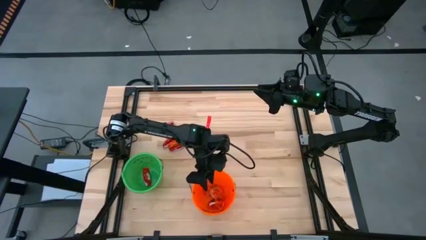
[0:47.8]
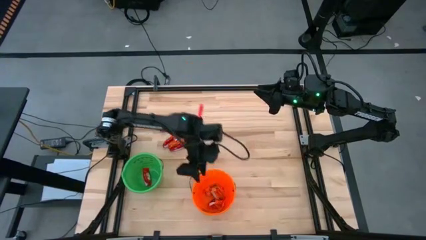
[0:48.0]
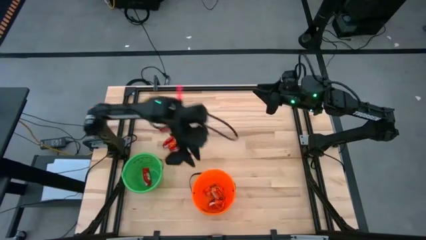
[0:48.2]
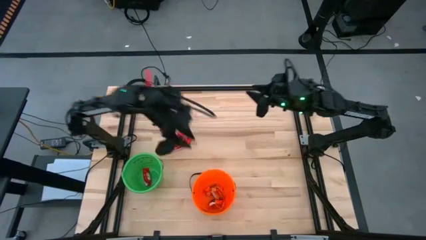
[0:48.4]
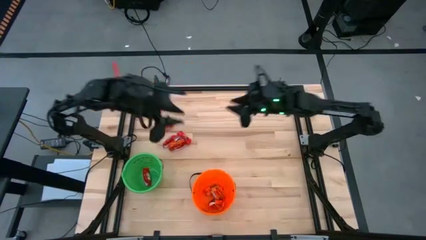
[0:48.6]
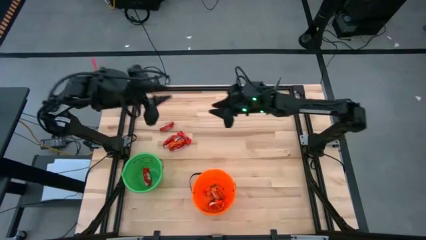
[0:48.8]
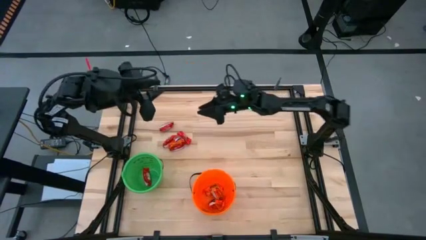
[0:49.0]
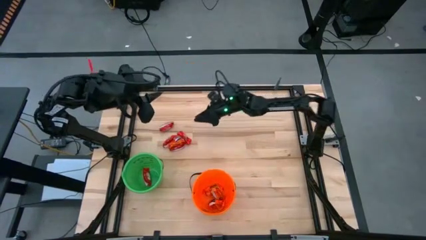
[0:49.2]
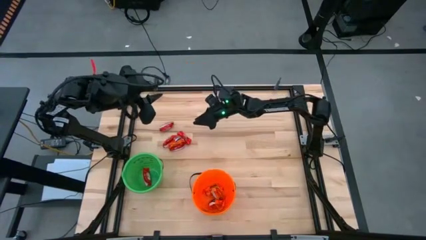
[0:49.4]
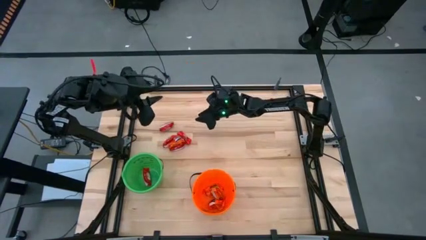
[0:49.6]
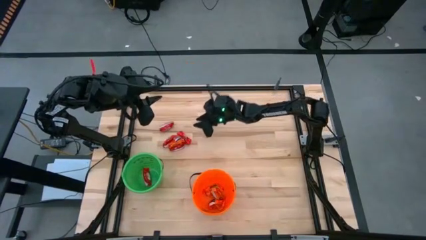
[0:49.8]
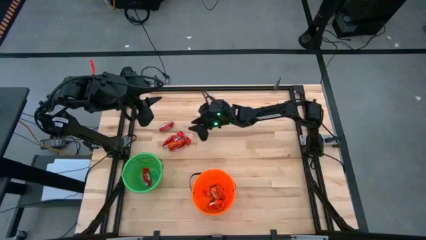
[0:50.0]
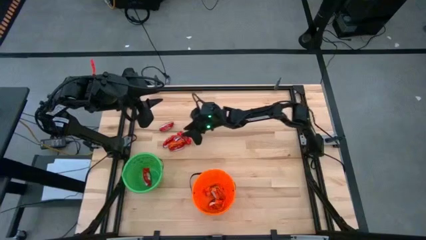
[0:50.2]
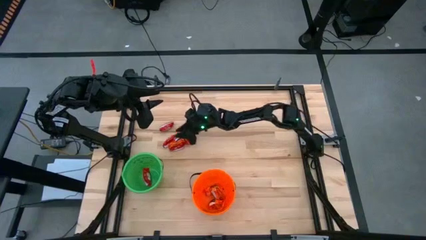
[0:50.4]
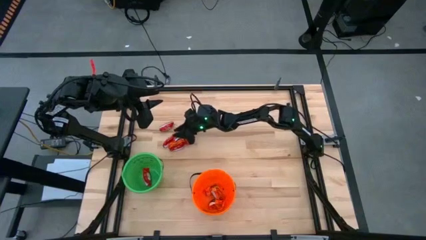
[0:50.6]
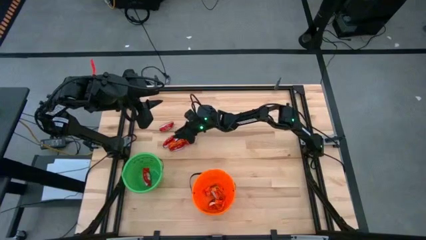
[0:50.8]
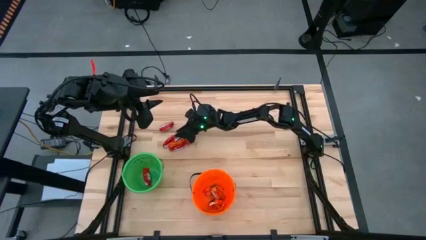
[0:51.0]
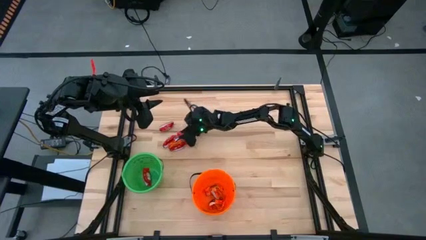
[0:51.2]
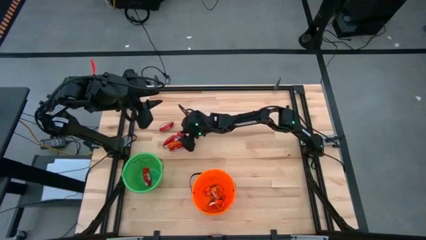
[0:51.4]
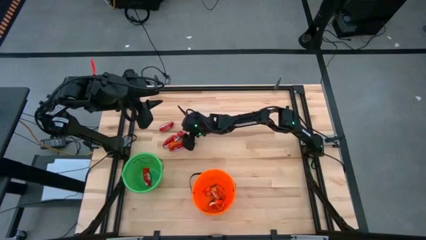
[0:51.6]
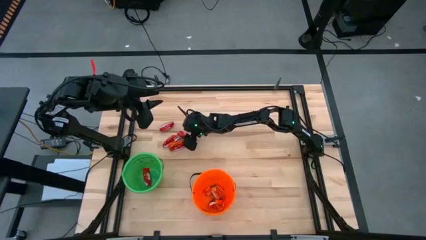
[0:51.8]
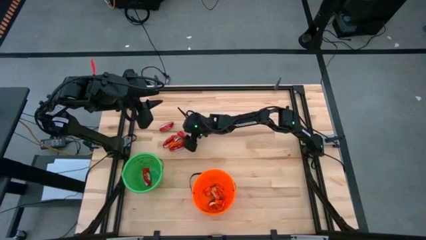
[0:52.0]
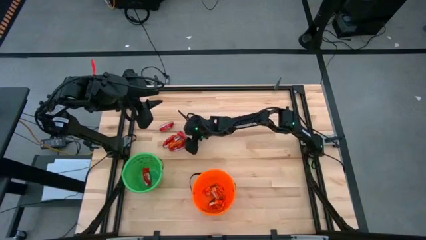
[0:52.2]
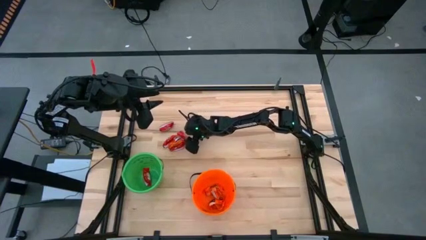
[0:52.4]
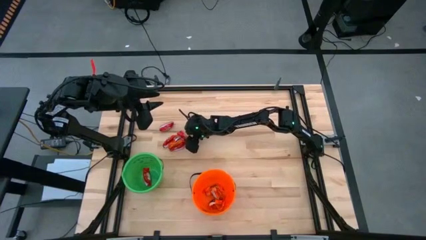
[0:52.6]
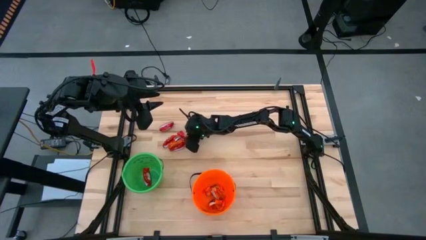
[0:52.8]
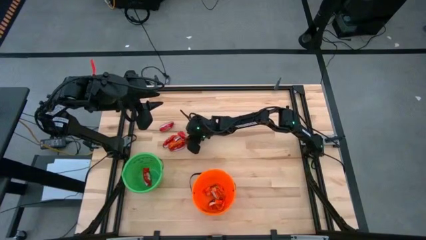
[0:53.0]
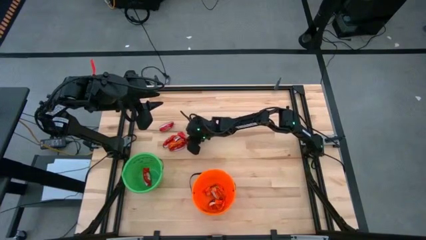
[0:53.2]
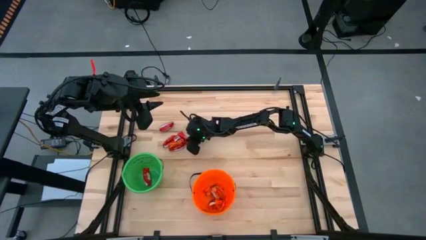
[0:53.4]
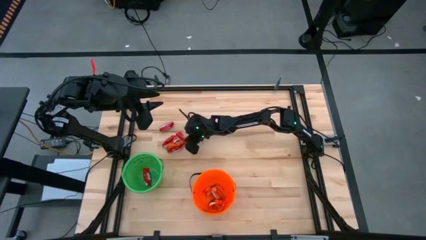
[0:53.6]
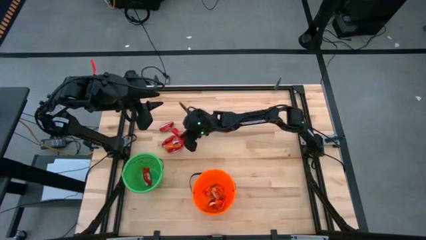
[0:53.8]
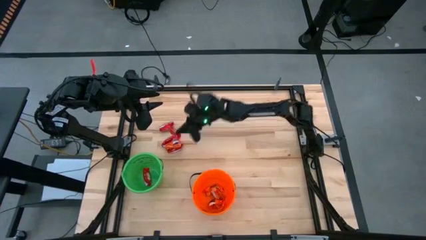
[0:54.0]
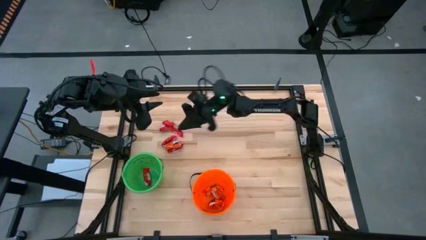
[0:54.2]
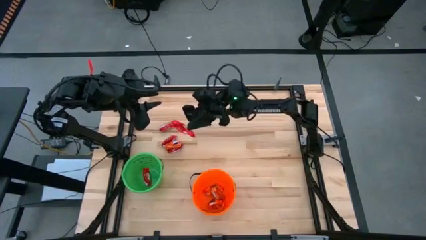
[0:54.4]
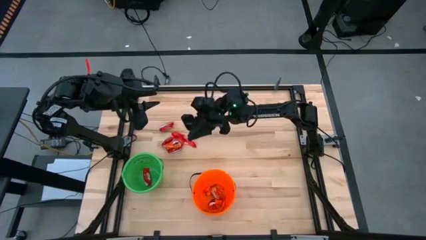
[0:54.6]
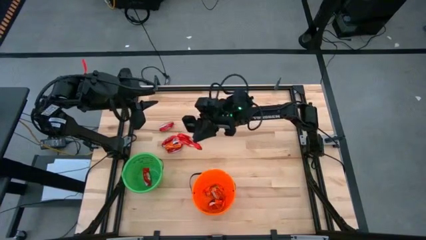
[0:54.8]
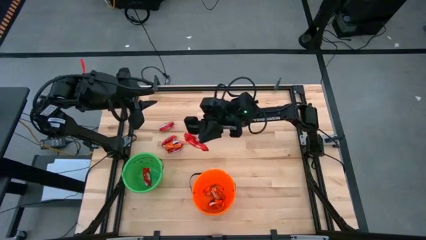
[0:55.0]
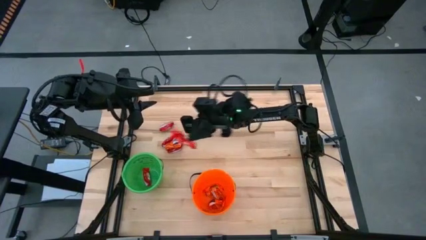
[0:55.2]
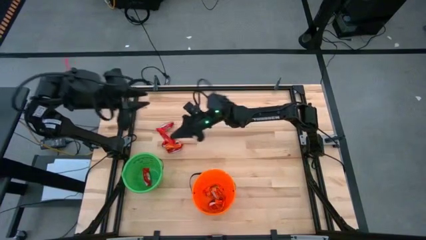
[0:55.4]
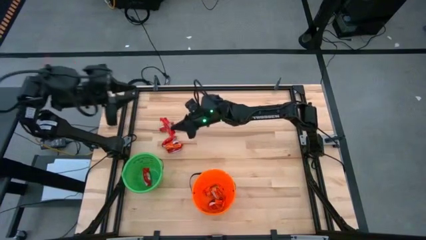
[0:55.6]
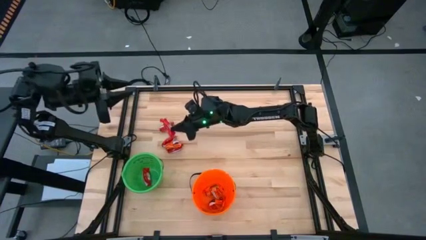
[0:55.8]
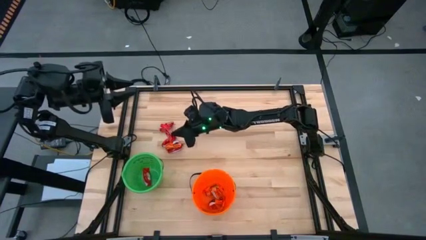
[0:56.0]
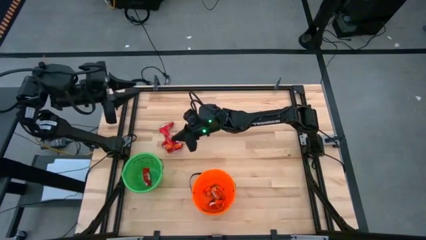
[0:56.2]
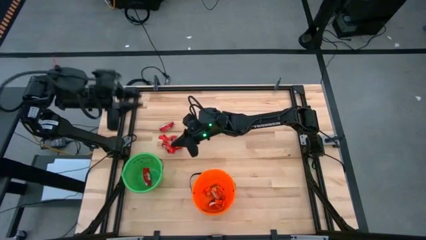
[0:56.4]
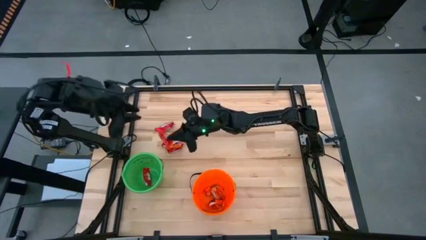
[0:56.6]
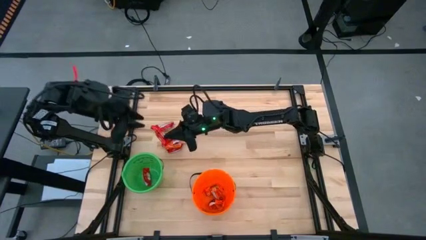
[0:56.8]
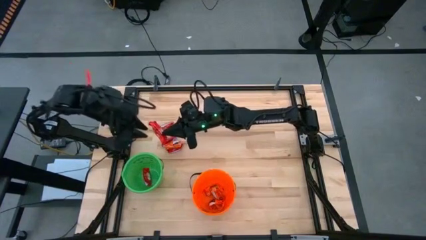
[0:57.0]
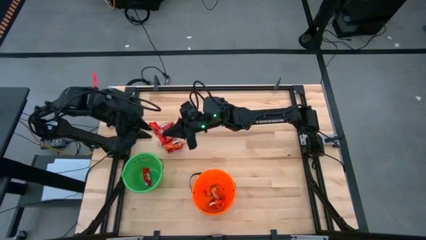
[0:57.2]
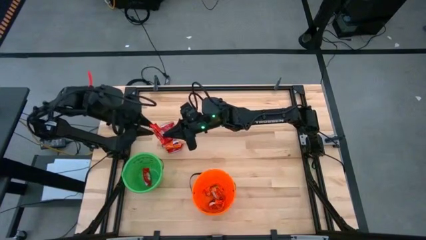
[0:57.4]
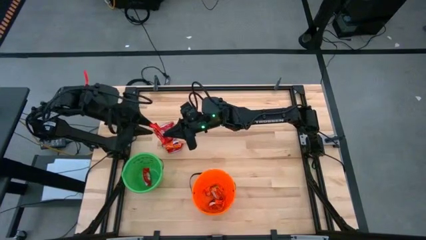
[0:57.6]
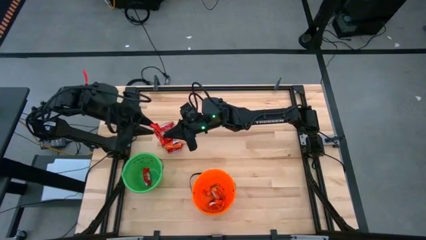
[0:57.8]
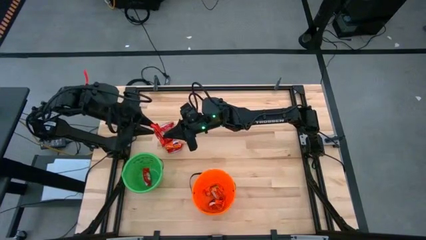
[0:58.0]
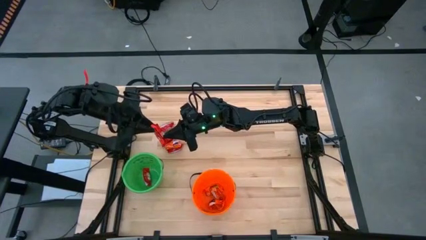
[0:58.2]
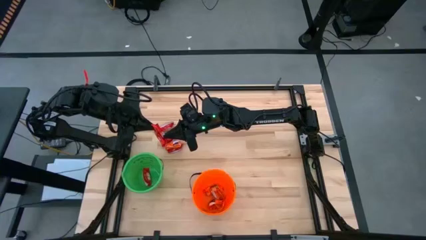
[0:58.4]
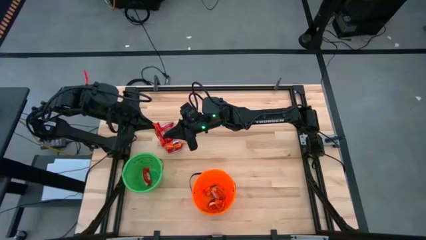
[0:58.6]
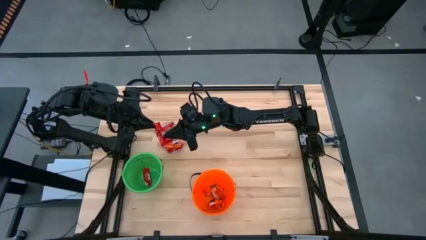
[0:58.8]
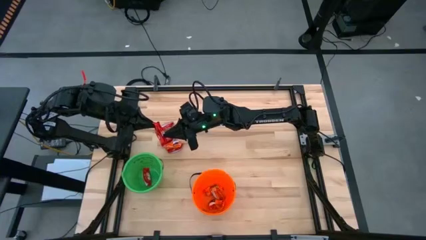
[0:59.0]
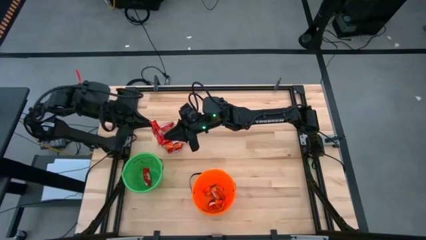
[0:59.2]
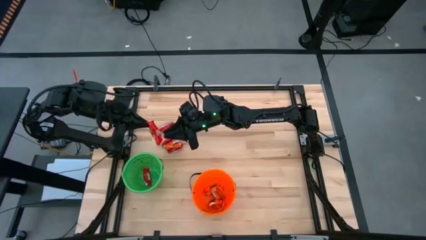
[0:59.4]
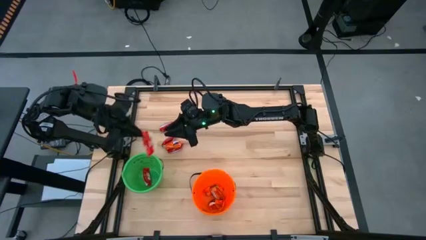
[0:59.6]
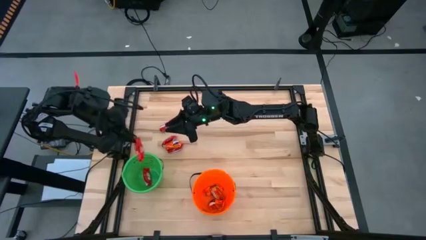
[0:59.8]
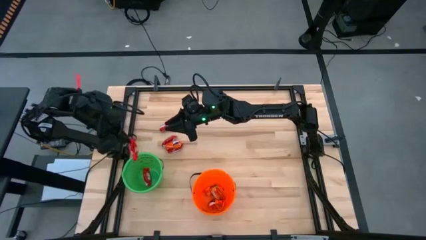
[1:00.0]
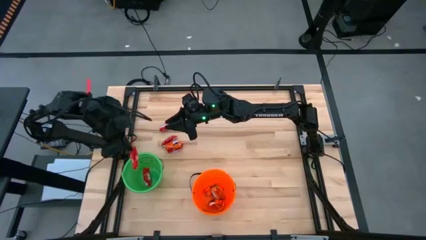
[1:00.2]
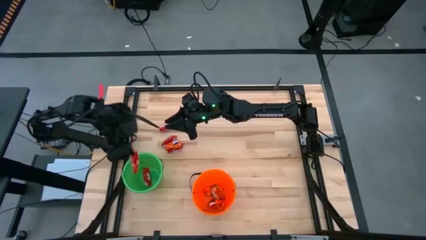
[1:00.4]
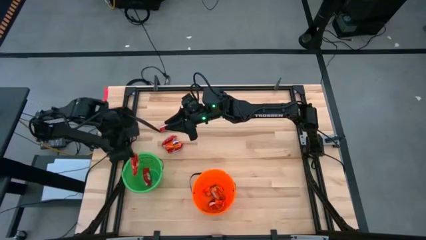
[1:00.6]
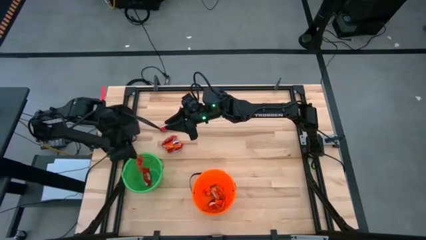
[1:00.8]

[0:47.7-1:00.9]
Put the red chocolate into the green bucket

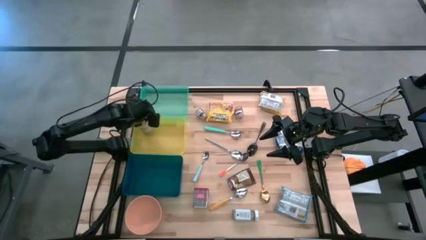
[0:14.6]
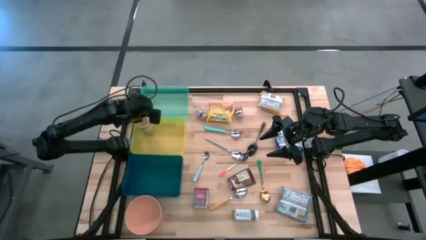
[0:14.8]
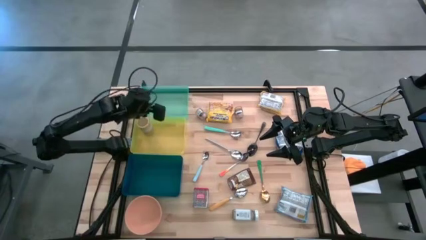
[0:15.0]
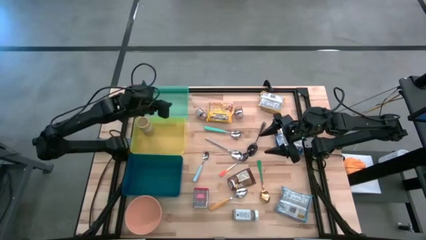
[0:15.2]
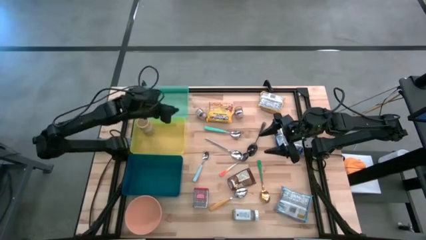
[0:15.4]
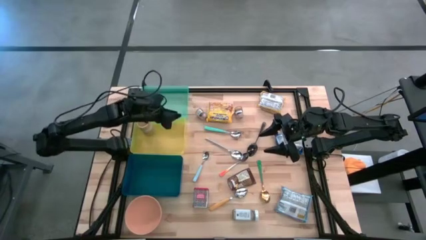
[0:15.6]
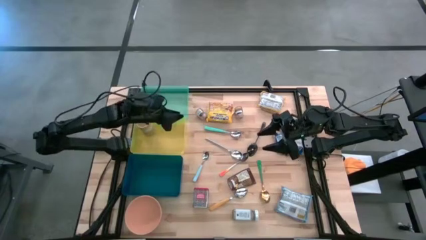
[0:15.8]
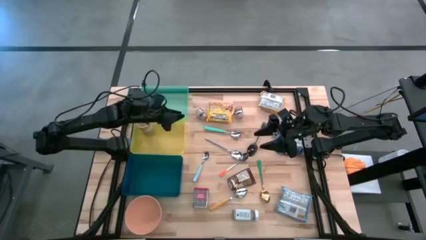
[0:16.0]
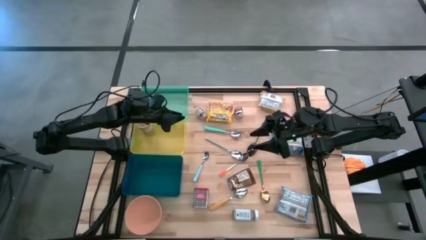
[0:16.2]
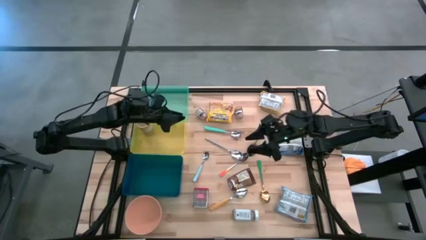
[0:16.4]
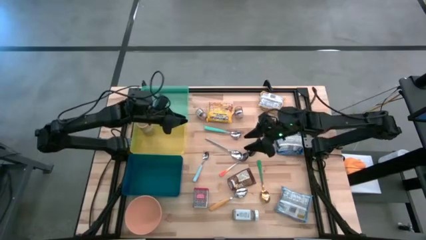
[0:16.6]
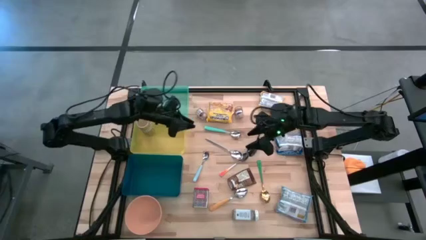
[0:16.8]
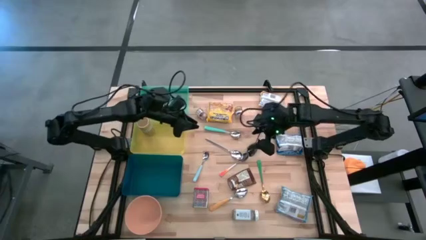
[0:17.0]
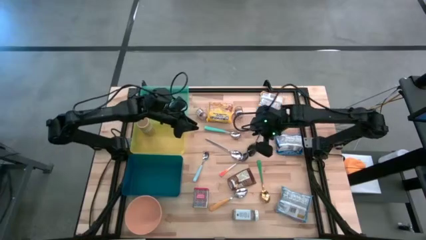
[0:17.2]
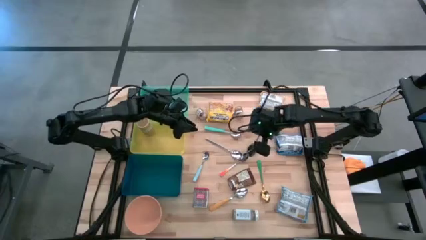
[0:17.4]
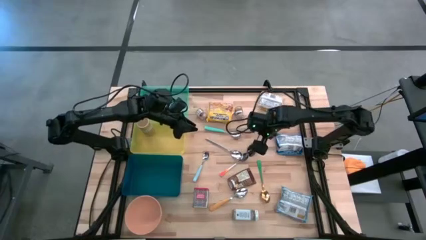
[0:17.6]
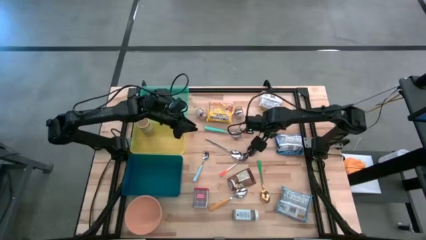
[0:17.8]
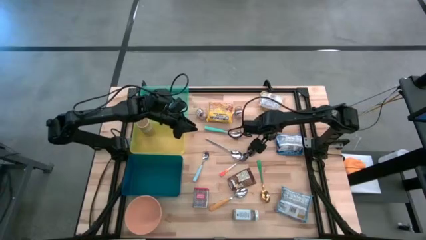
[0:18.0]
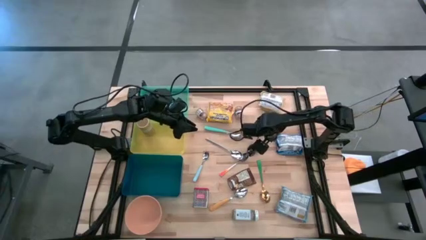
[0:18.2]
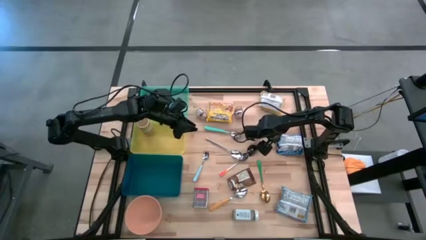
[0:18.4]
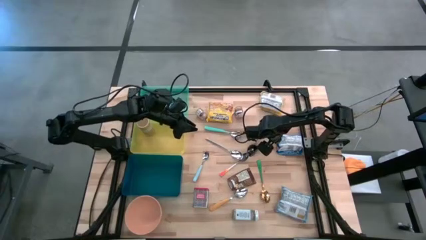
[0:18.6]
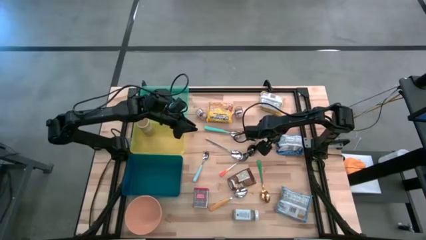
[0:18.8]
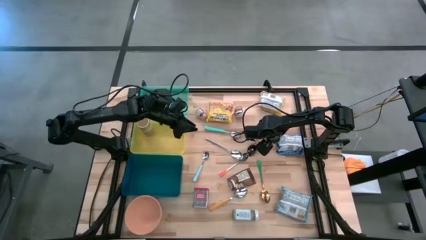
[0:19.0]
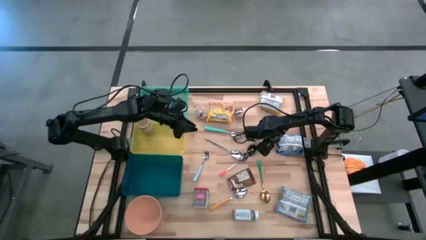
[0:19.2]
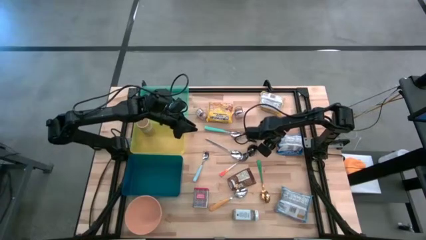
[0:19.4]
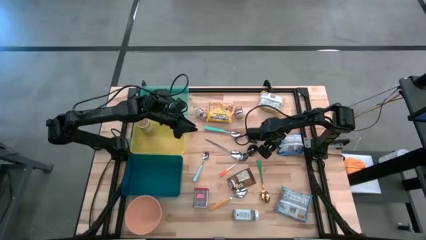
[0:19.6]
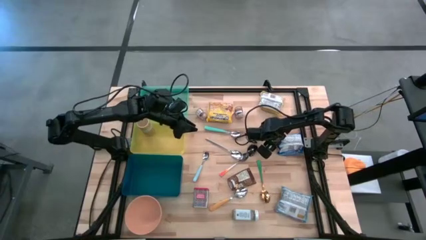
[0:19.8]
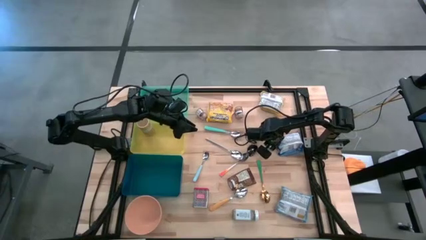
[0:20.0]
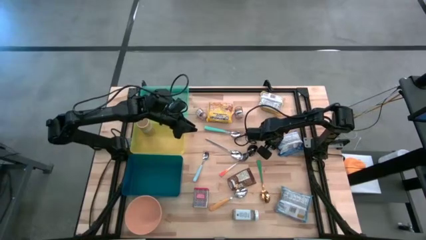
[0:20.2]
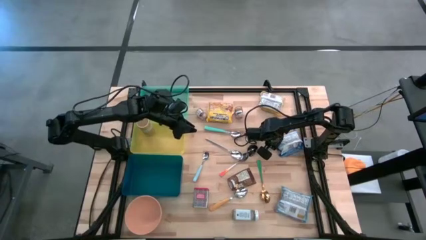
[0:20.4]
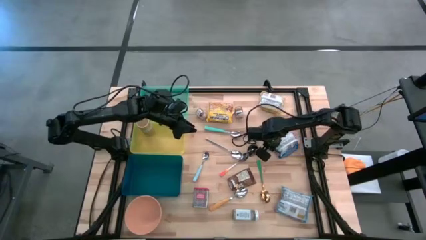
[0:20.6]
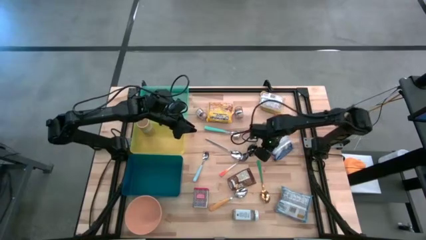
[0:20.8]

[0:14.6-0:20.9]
Put the blue noodle pack into the blue bin
